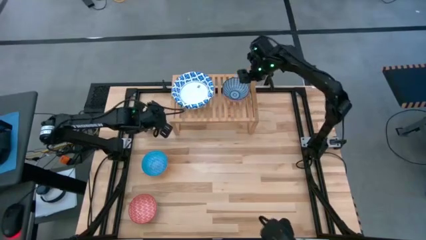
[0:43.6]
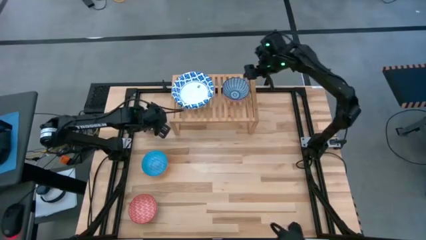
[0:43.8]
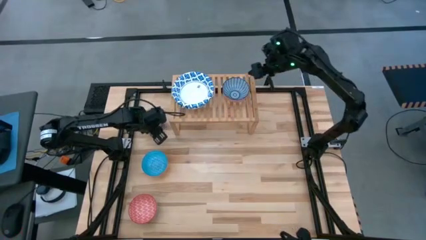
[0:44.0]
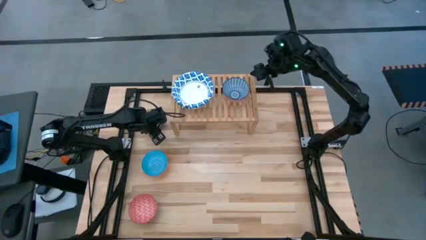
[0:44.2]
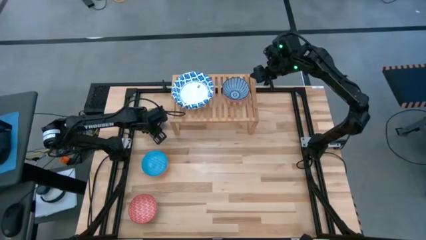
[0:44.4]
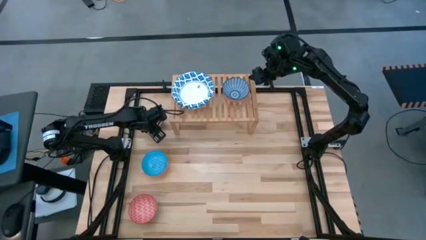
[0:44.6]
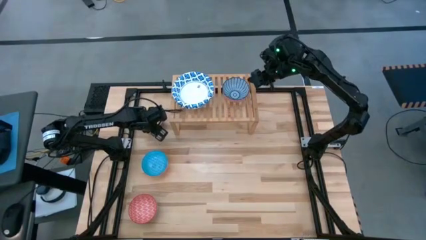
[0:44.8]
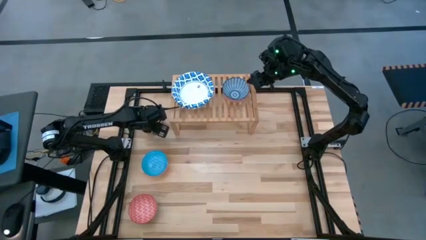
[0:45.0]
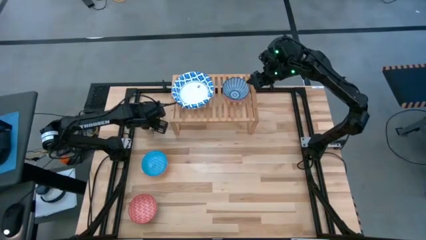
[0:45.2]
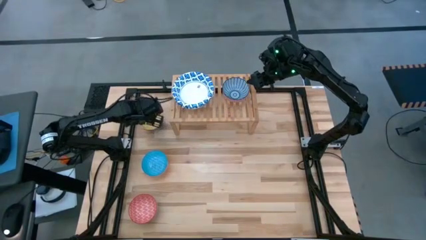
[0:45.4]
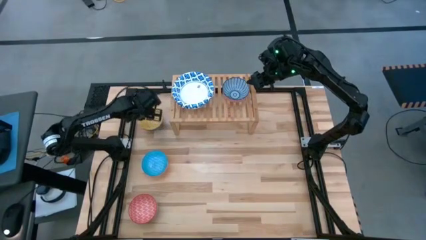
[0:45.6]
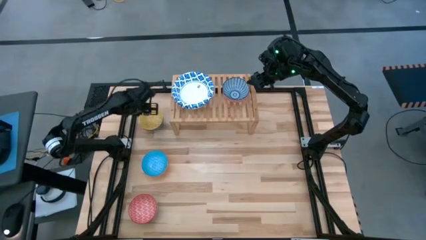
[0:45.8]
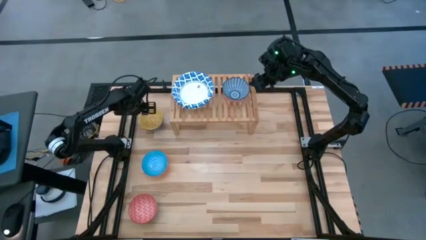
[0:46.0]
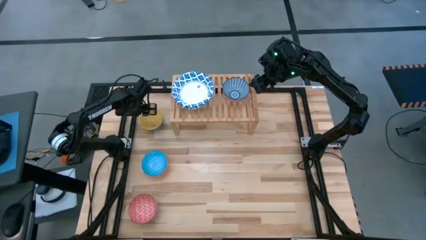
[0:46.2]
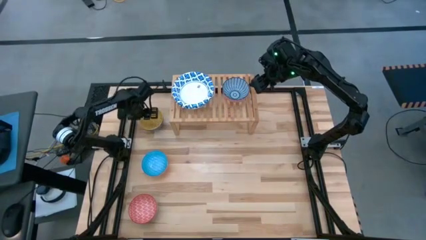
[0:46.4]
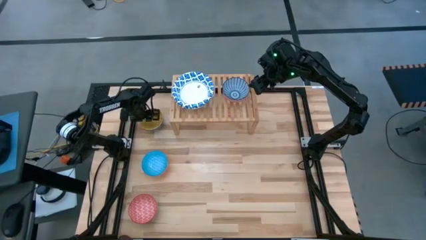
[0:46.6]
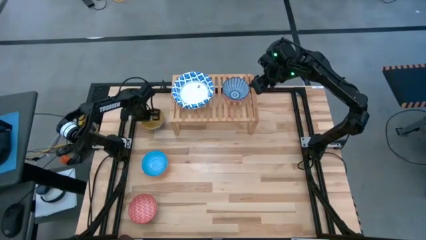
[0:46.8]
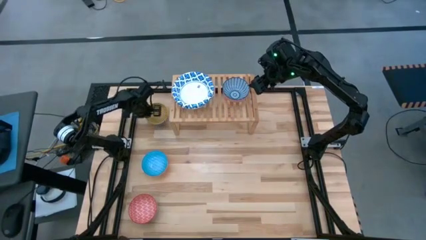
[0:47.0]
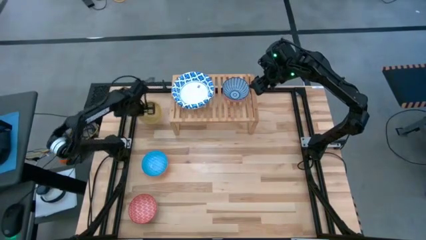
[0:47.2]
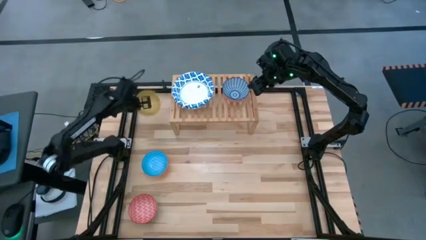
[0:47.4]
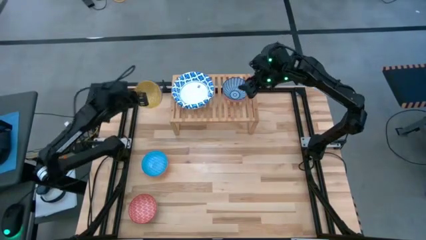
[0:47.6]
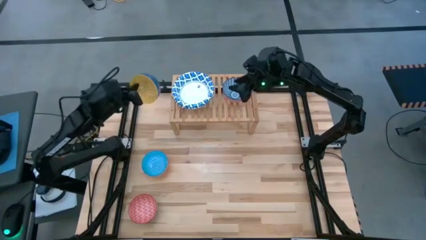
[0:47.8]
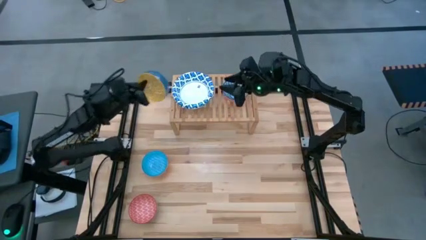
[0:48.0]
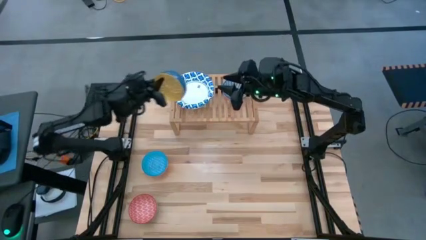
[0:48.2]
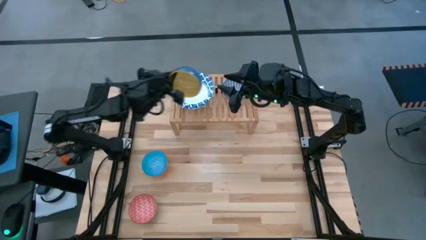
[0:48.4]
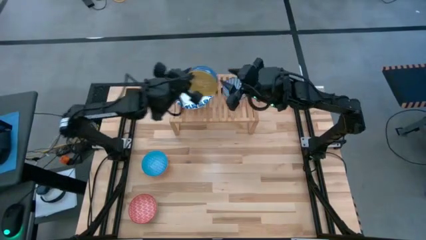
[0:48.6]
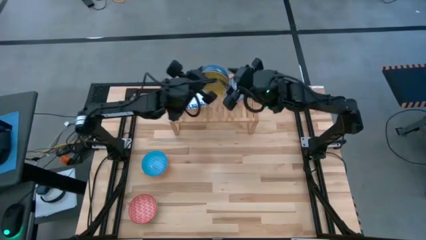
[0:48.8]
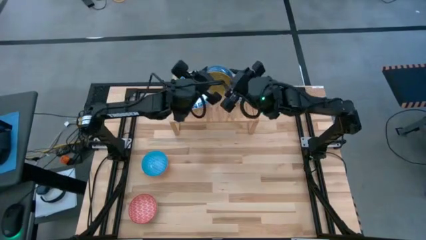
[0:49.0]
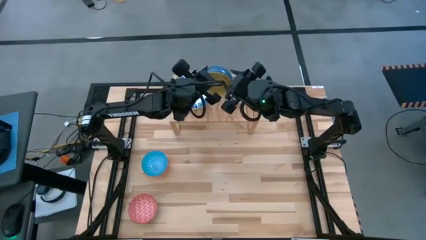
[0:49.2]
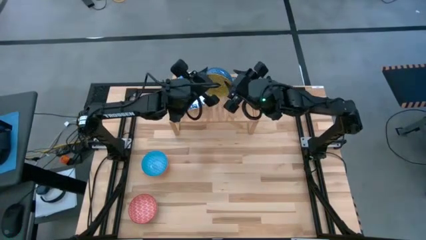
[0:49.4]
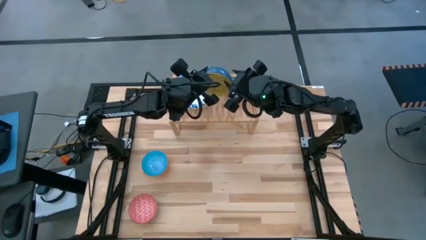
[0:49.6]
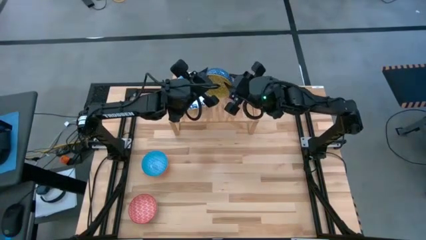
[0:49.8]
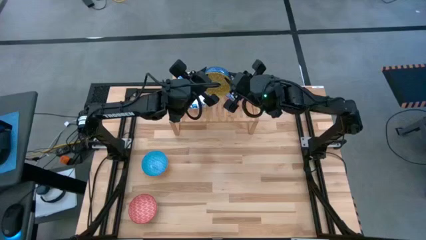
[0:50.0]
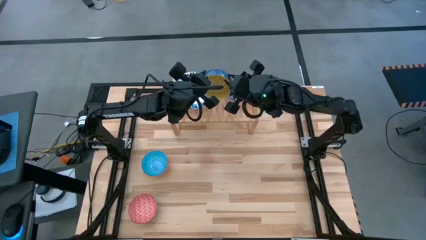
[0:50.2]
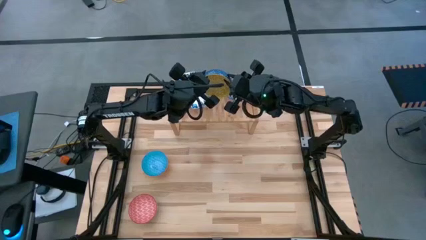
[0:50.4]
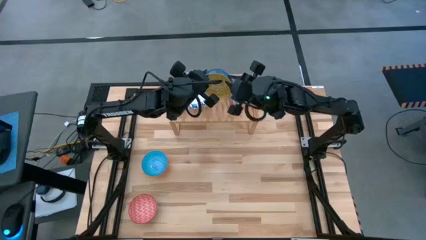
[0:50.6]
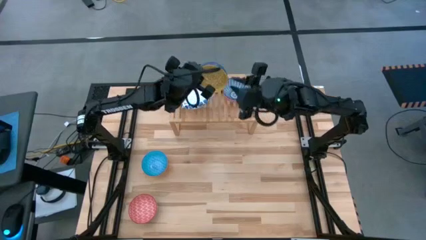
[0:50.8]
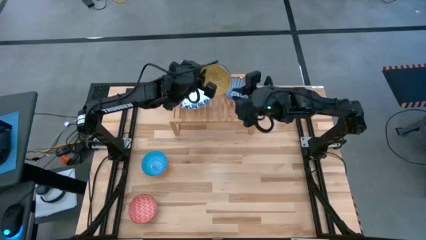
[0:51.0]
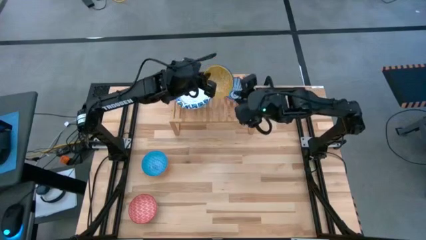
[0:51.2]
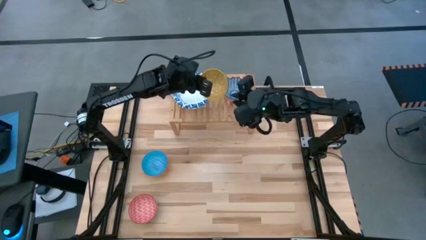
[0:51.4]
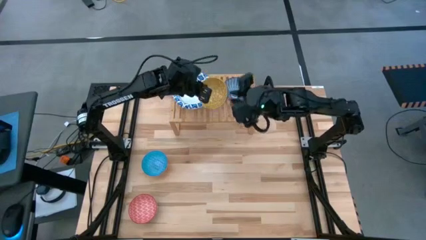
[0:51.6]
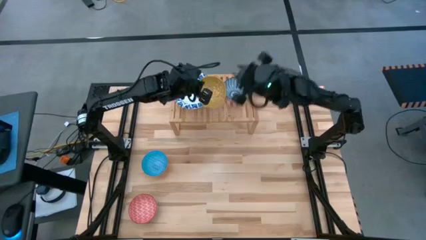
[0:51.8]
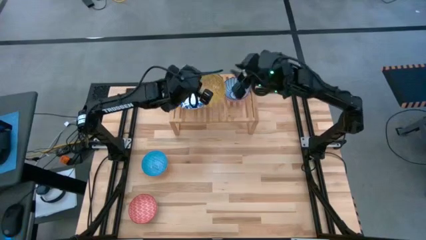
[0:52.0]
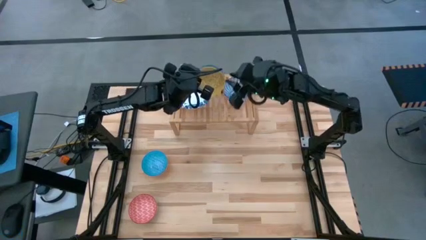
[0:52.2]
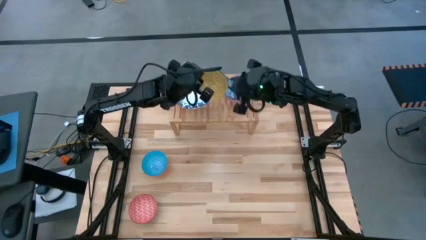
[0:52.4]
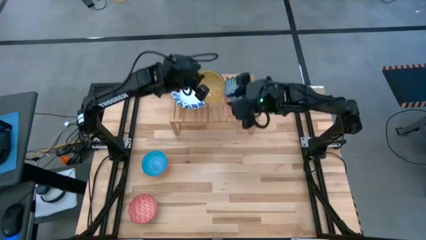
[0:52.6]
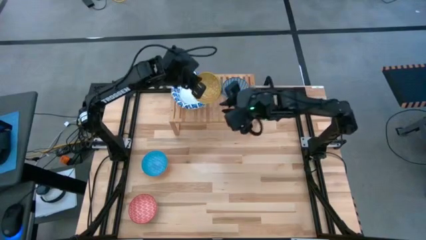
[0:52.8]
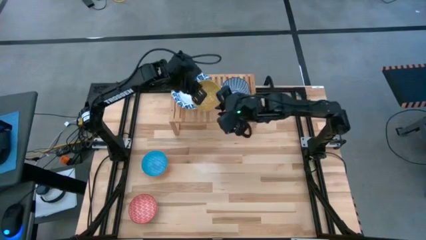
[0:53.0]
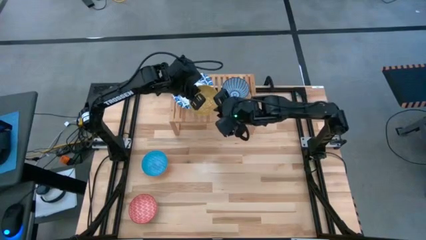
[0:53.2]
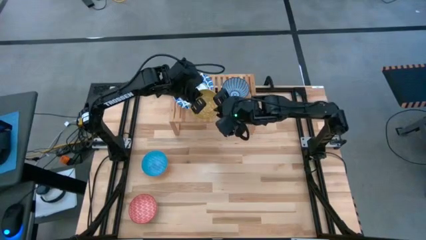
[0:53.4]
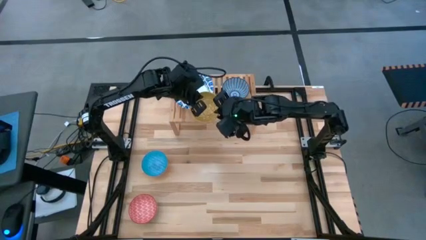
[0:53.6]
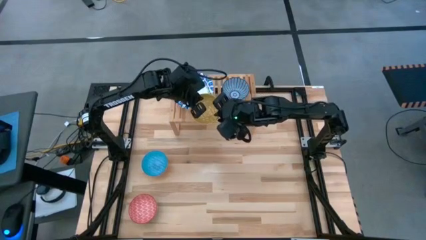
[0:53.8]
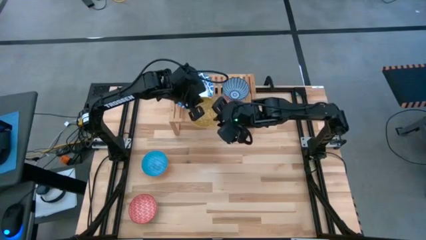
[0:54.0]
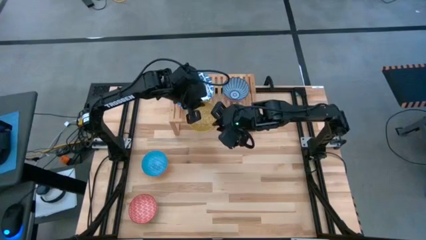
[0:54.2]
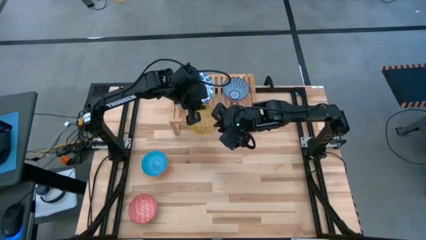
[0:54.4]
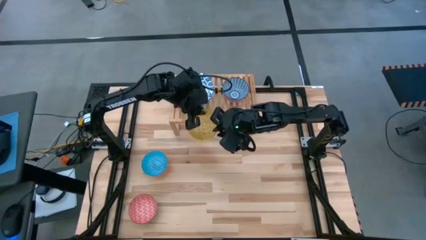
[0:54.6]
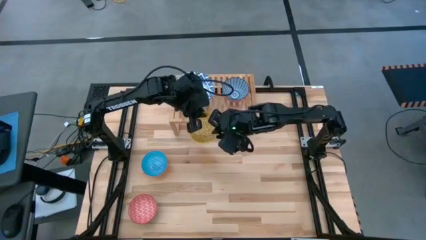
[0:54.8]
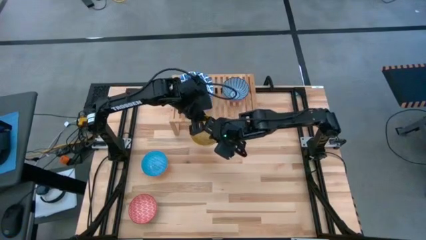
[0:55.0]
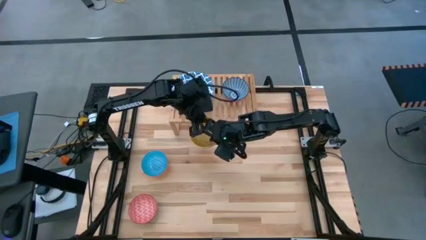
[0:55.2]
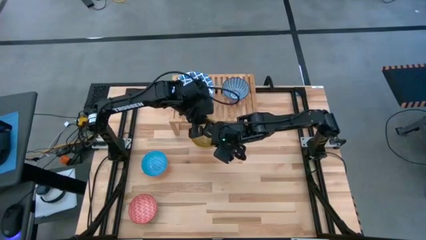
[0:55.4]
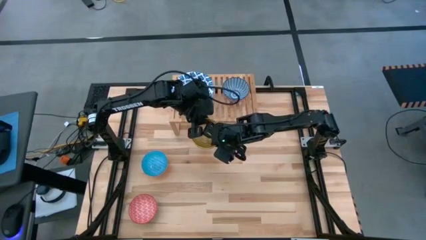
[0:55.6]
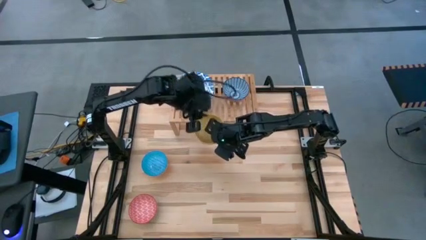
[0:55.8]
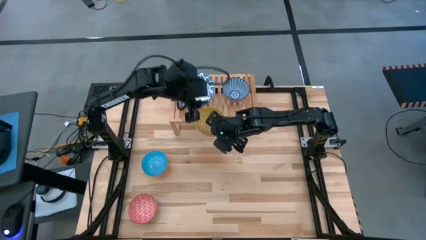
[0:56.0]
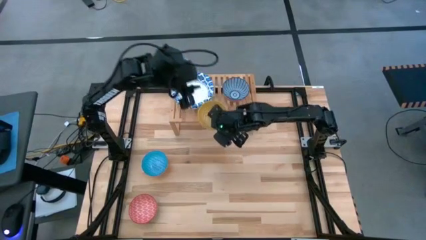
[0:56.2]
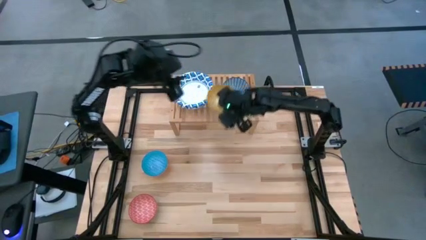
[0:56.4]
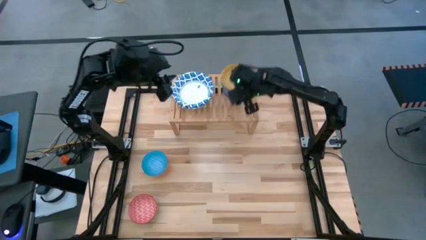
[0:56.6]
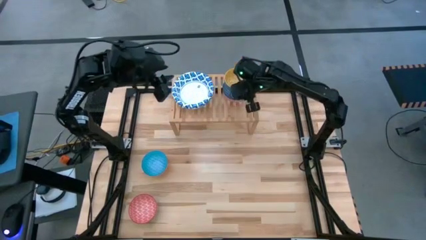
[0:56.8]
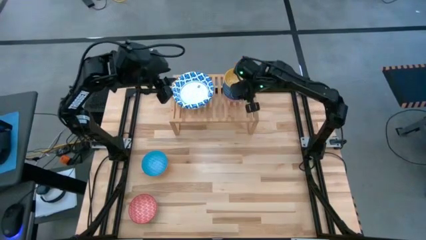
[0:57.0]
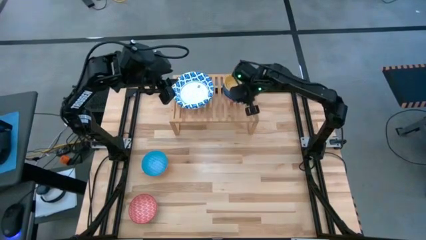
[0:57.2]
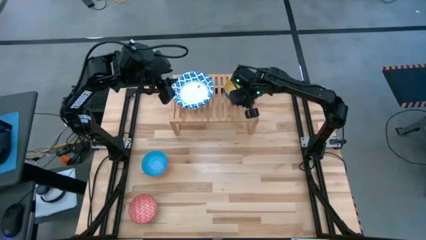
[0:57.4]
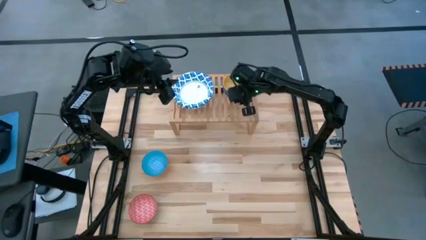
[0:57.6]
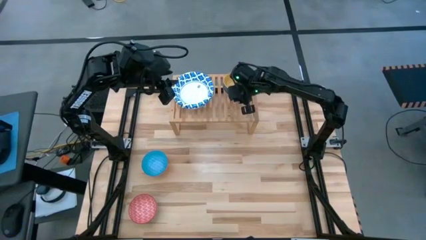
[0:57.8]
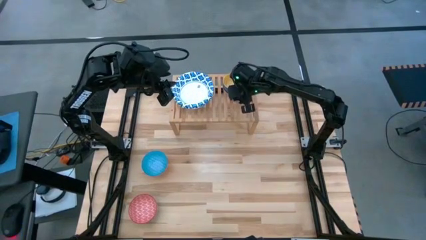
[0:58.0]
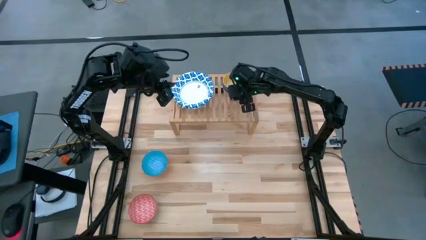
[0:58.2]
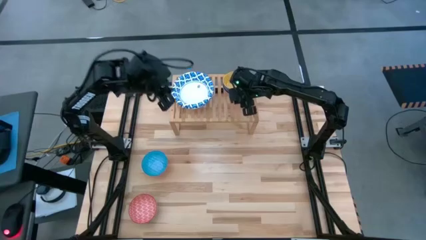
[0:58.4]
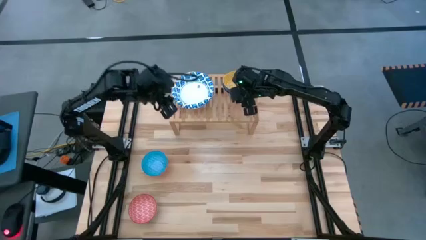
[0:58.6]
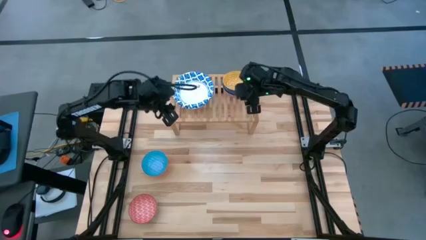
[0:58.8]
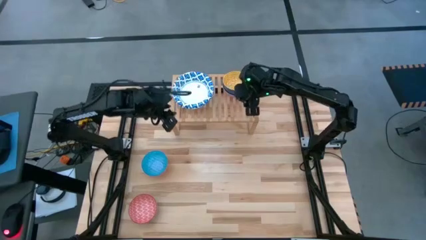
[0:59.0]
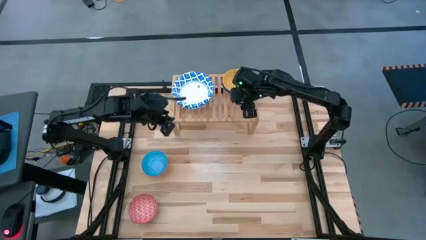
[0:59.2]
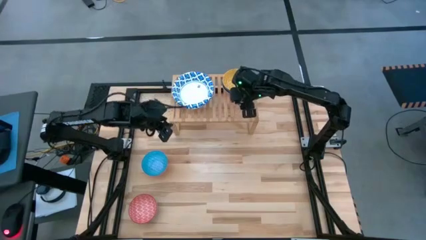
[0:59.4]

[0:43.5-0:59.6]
Task: Place and stack bowls onto a shelf
Stack the blue yellow patterned bowl on top of the red blue patterned bowl on the shelf
